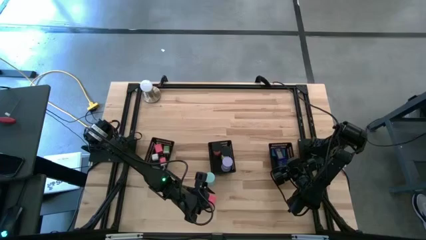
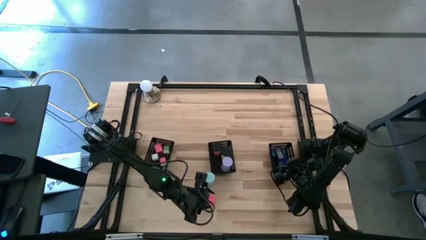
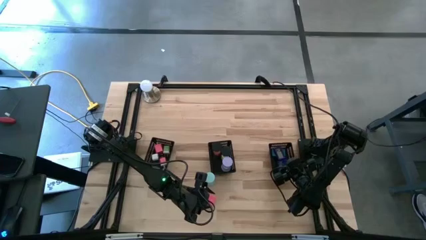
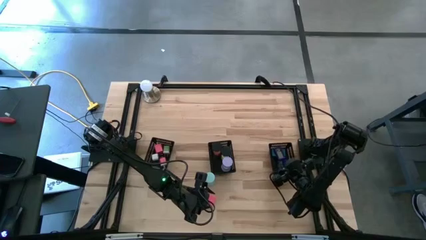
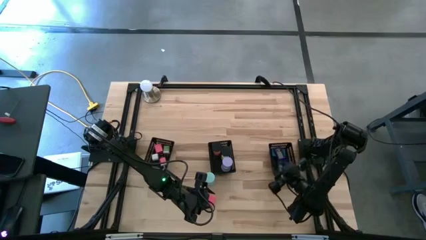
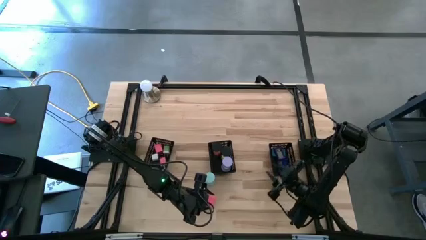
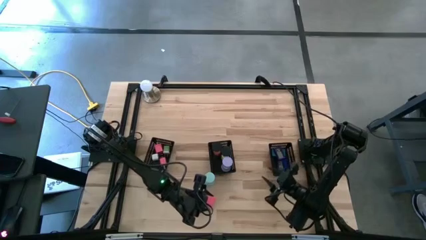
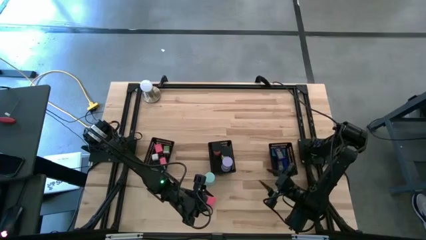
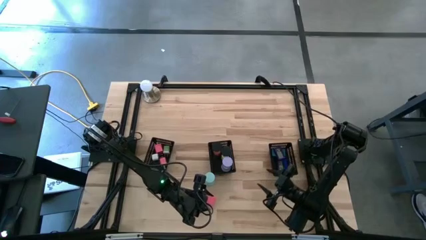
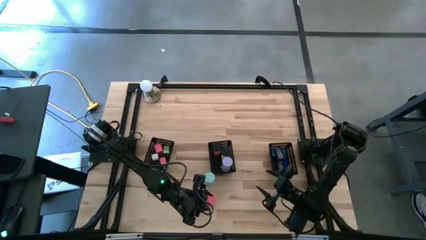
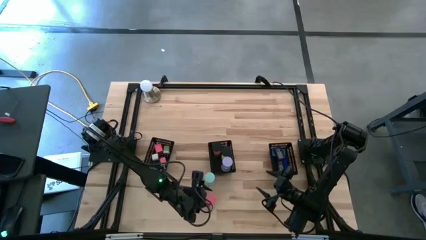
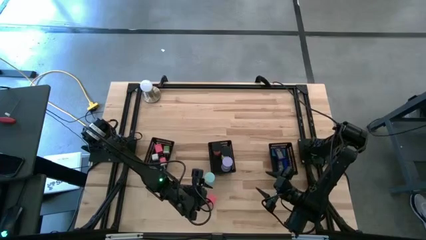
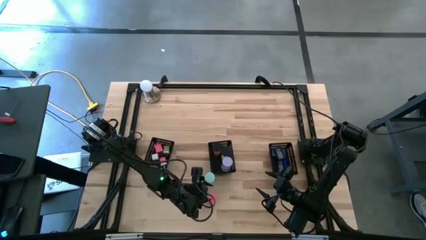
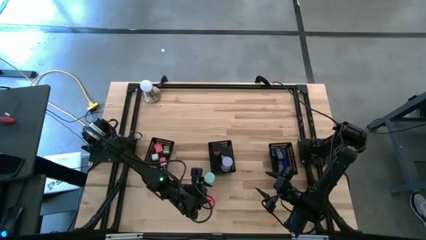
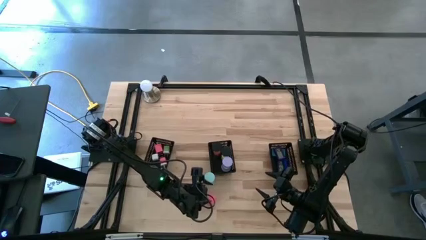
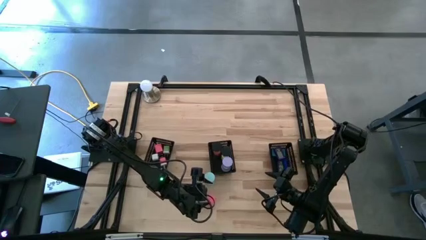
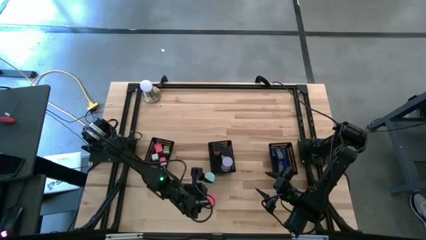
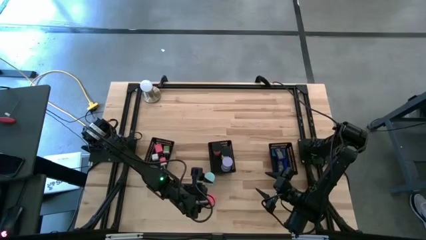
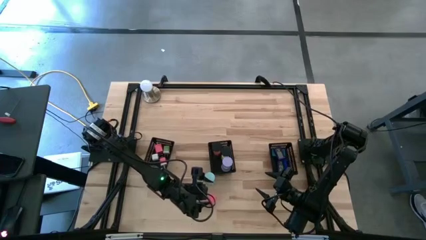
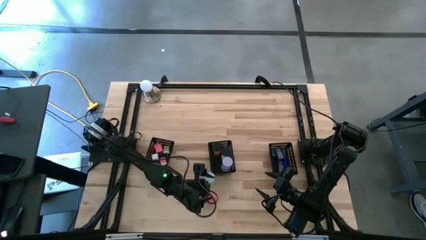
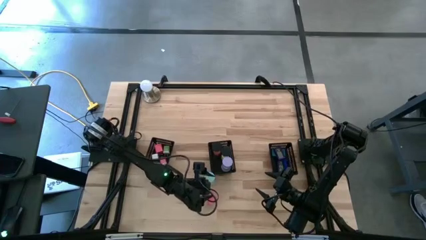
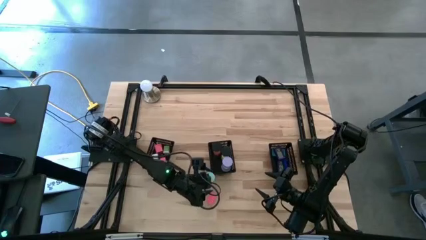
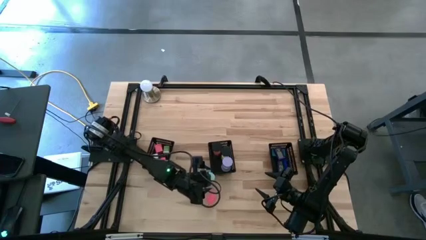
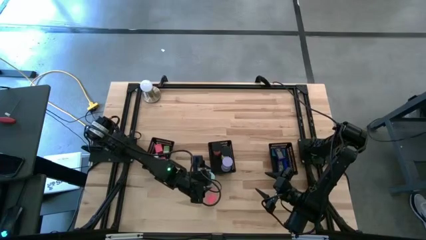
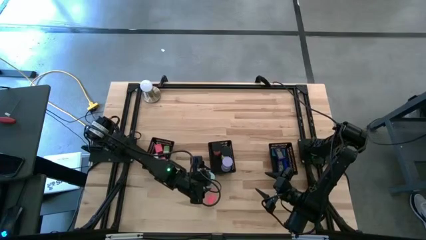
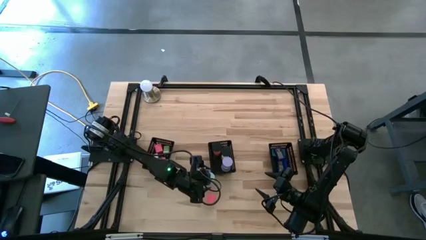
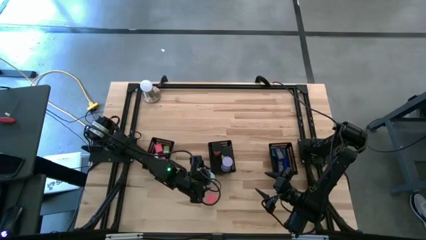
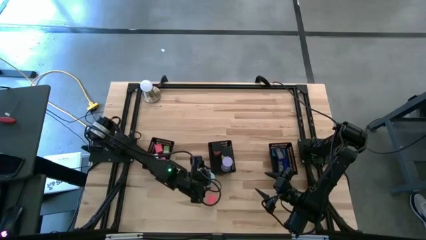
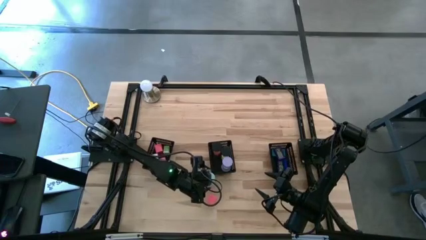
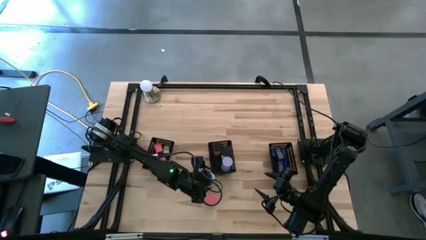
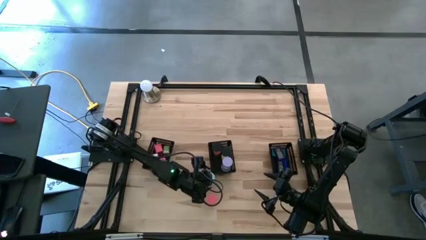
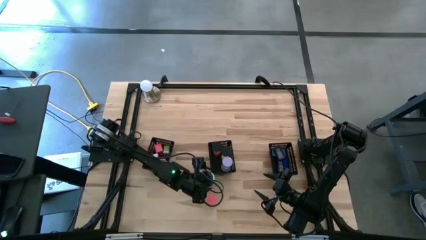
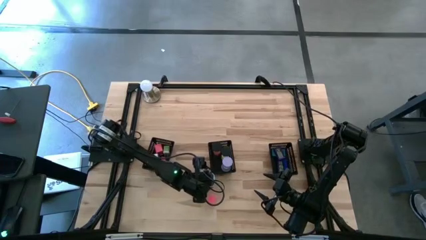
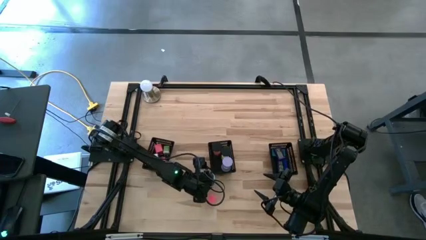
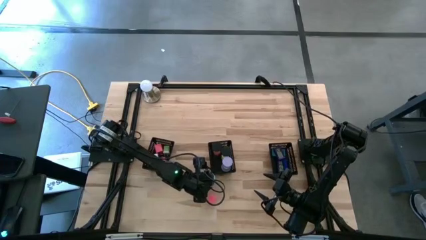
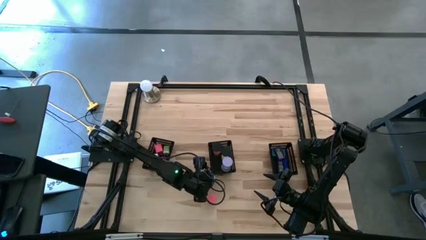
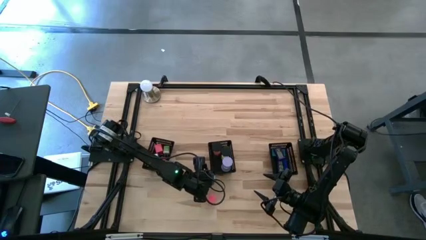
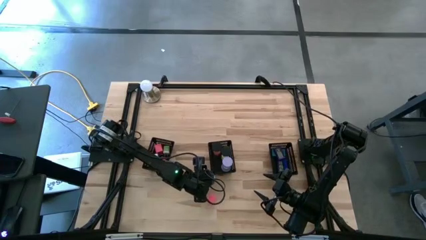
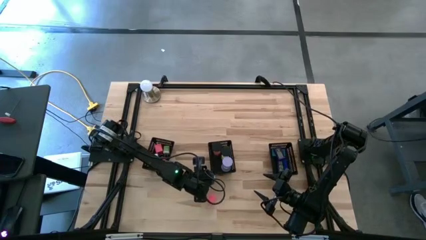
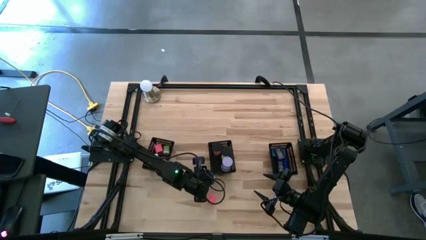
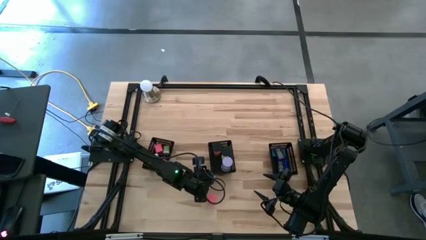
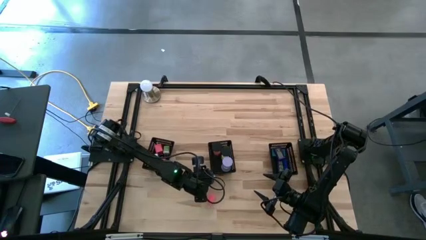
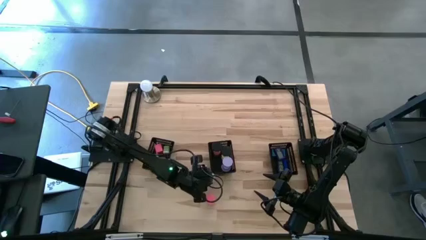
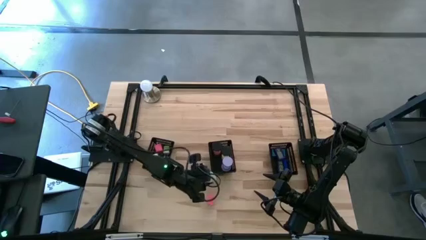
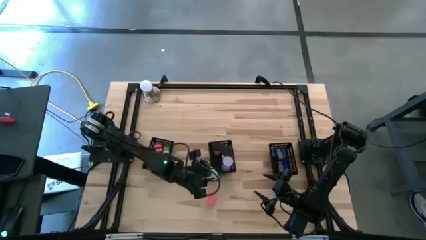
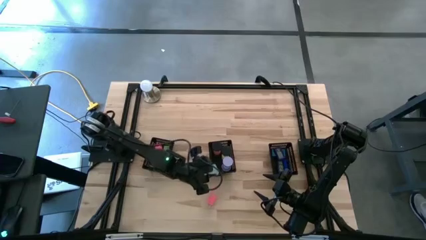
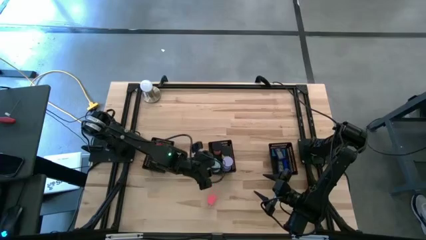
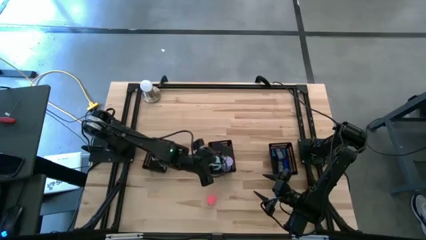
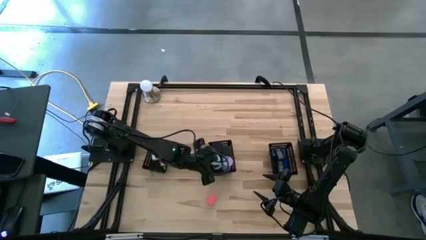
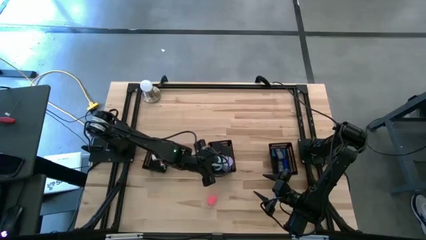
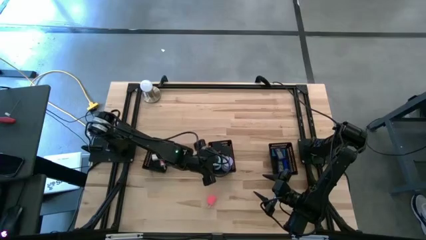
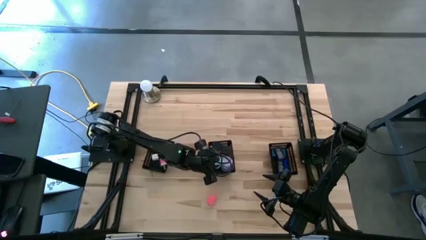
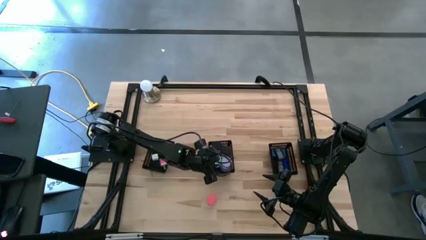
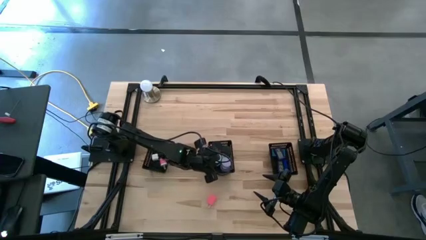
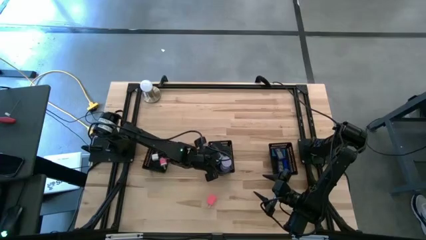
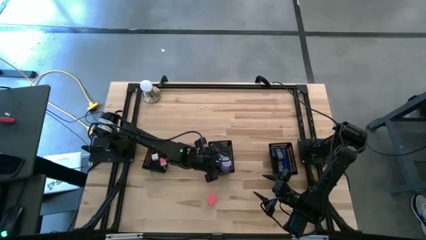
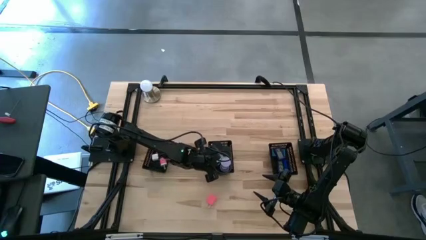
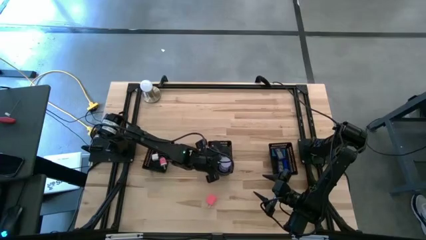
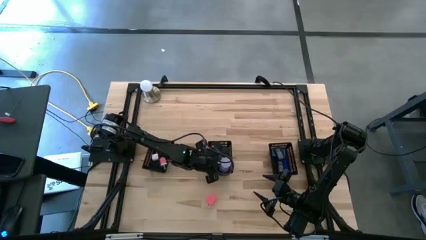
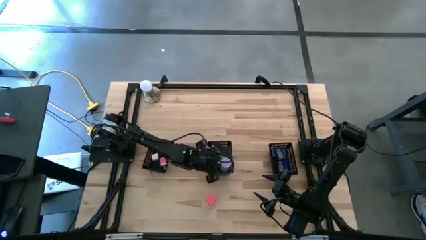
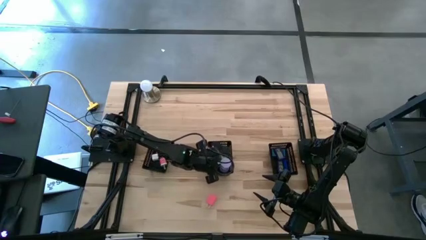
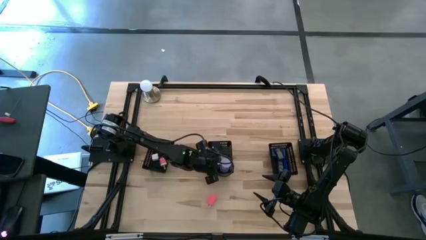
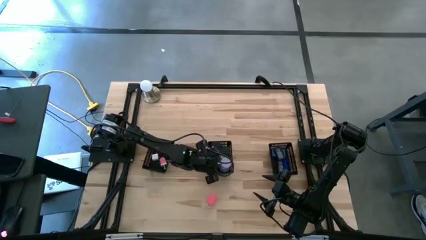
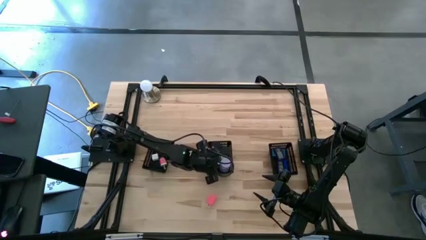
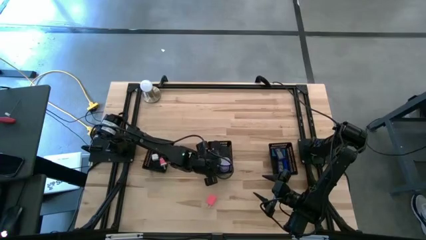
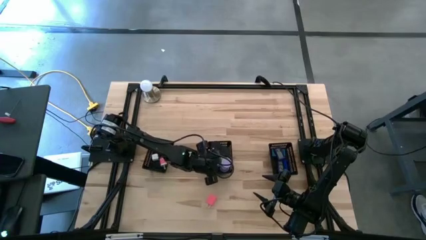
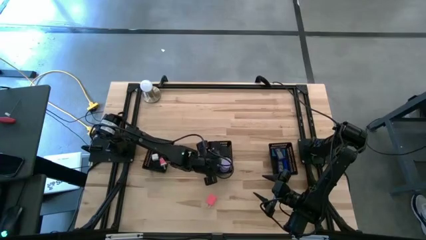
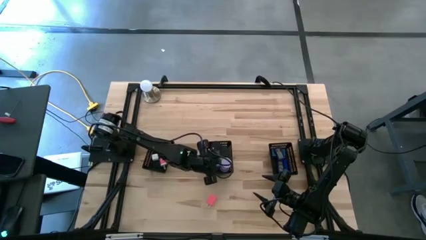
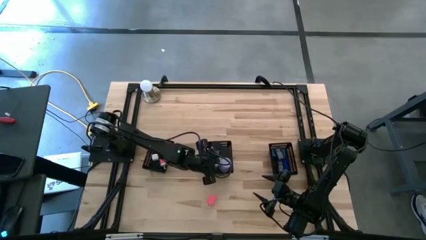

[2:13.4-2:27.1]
Task: Pick & Place Office items
Put the blue hourglass into the middle black bin

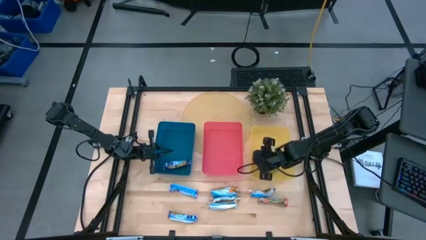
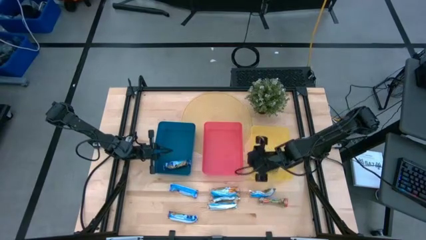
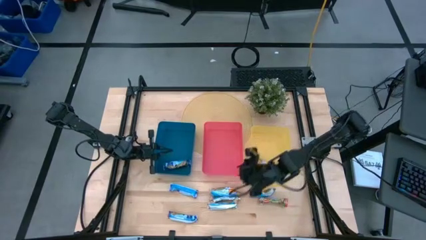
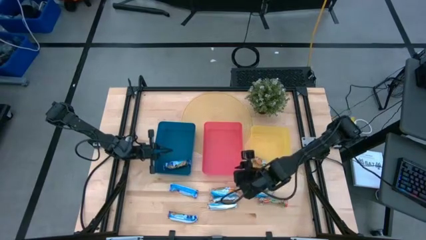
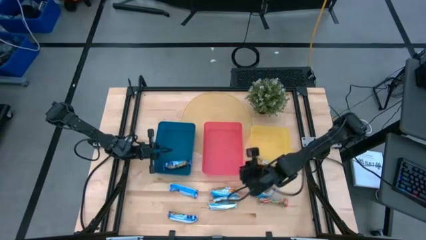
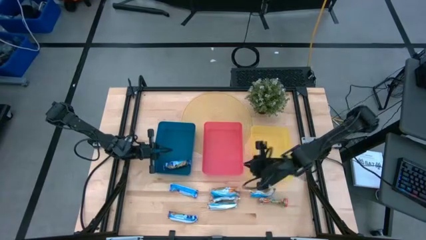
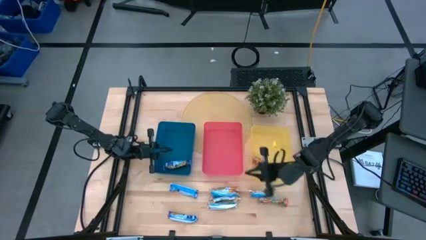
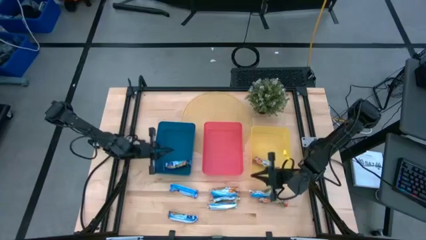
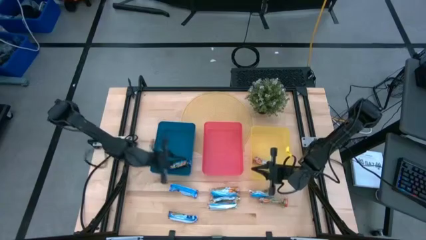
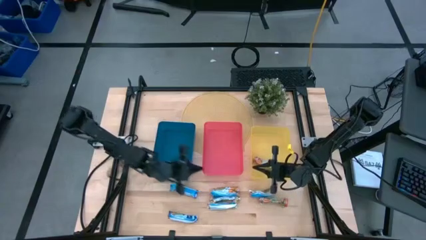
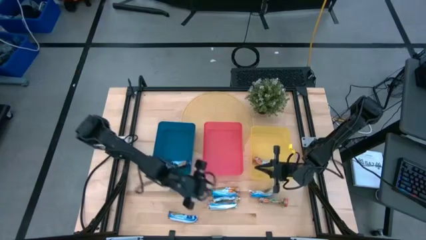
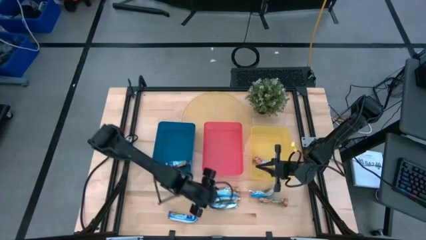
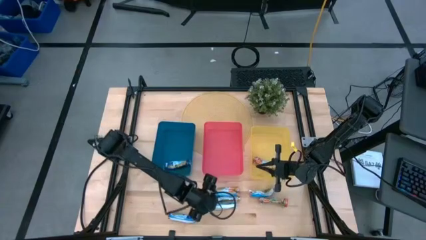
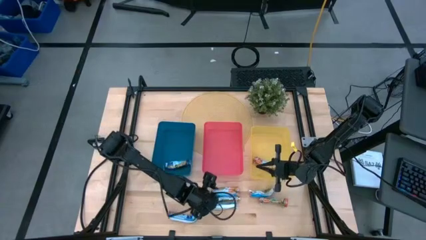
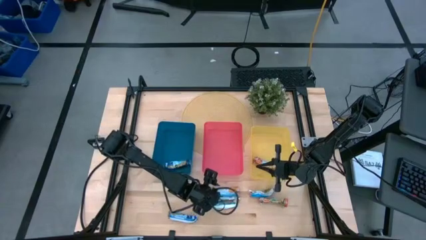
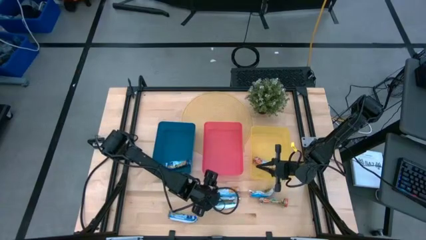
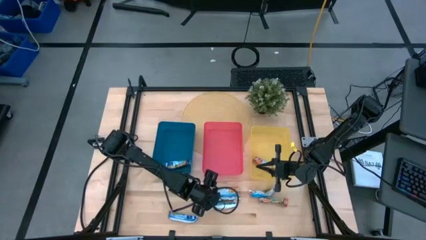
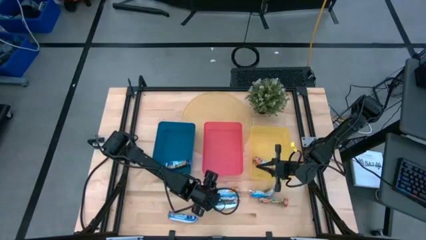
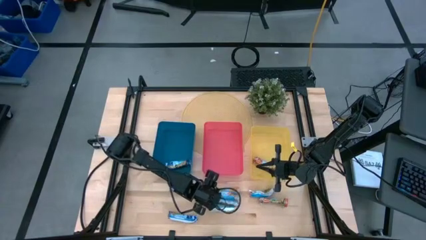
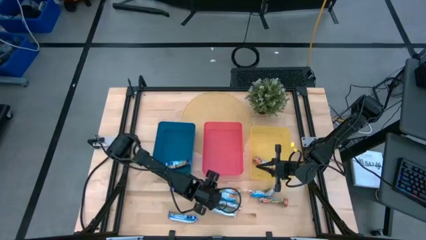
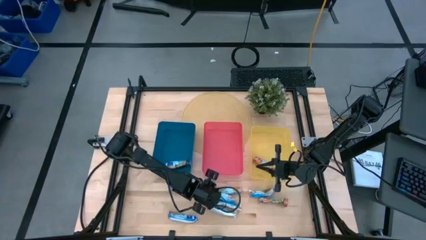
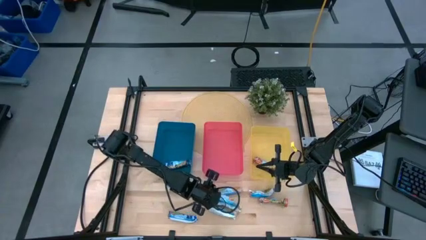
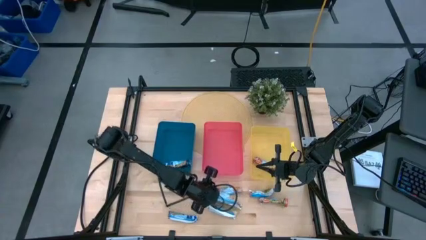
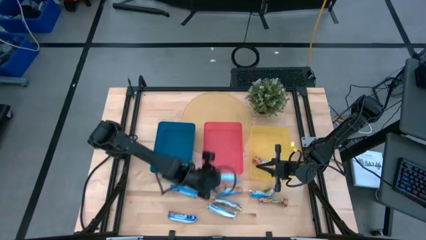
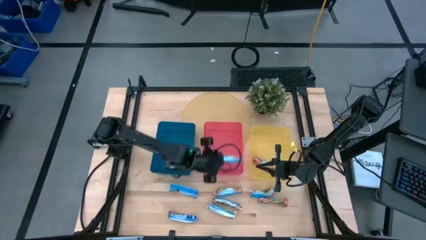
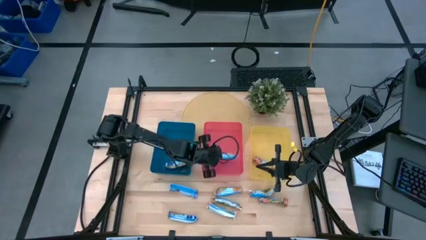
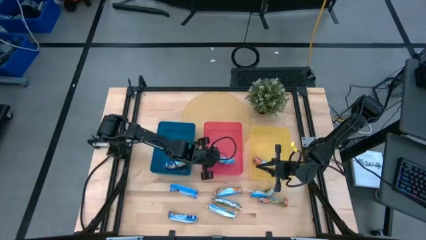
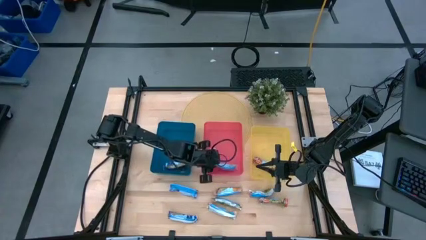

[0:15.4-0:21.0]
Task: Pick and place Granola Bars by type
Put the yellow granola bar into the red bin
